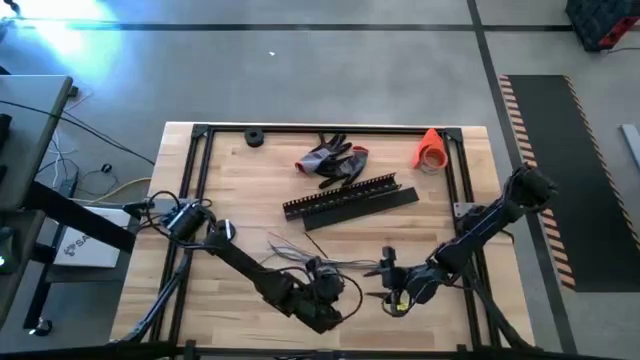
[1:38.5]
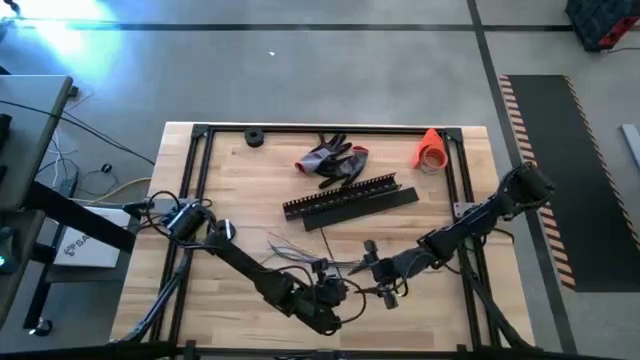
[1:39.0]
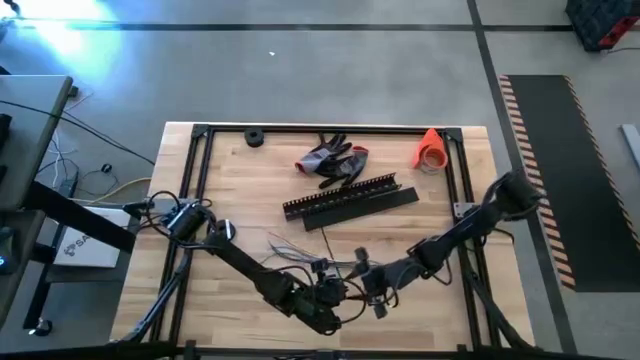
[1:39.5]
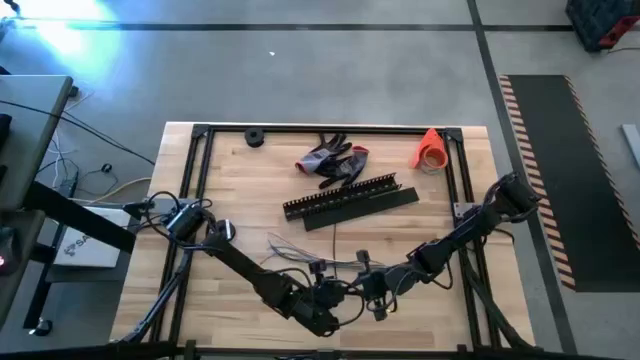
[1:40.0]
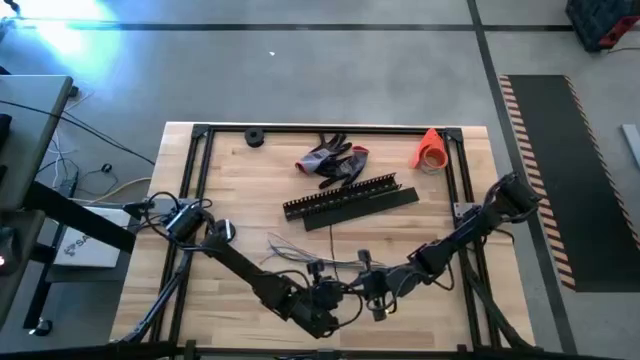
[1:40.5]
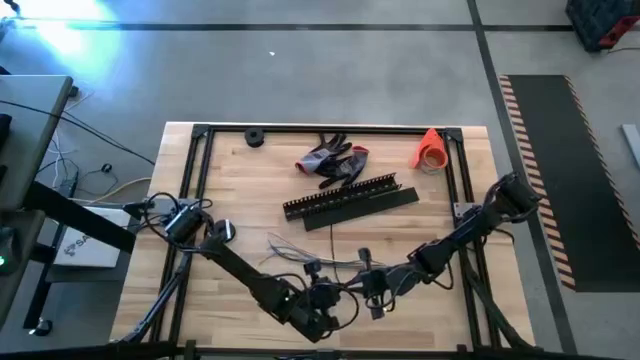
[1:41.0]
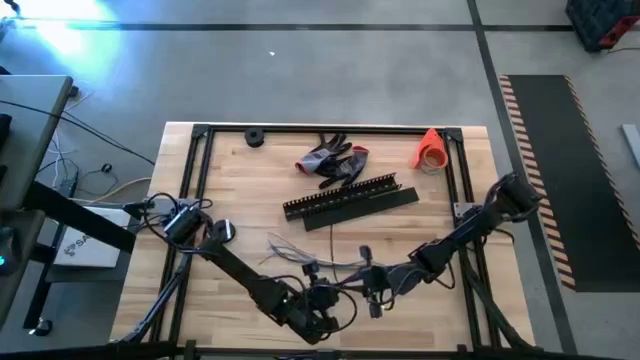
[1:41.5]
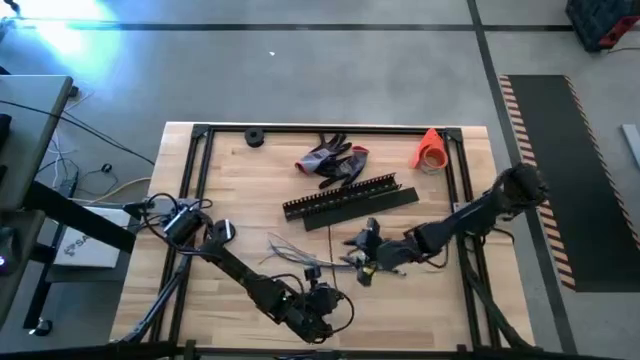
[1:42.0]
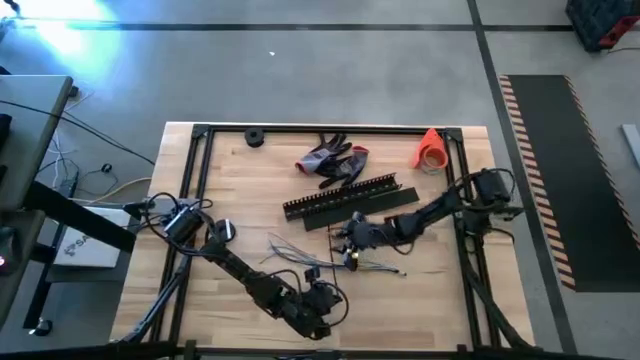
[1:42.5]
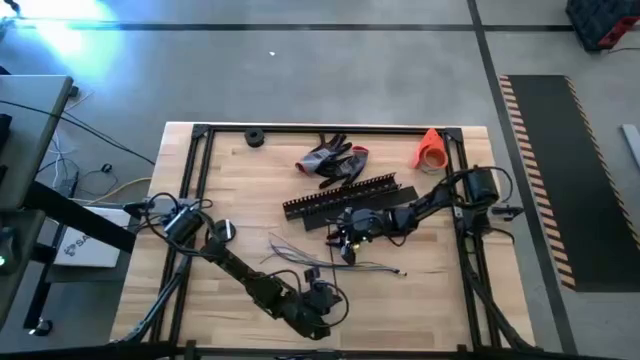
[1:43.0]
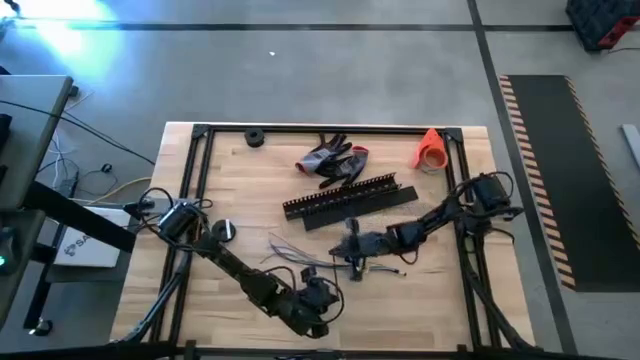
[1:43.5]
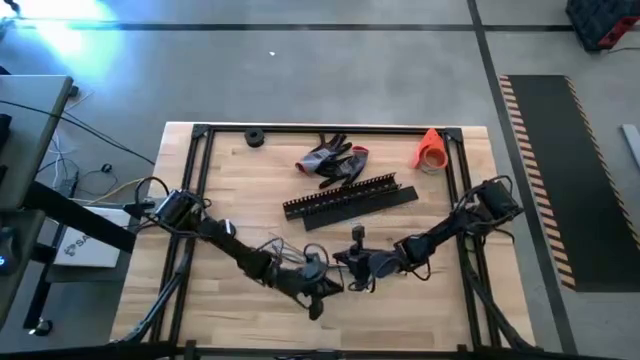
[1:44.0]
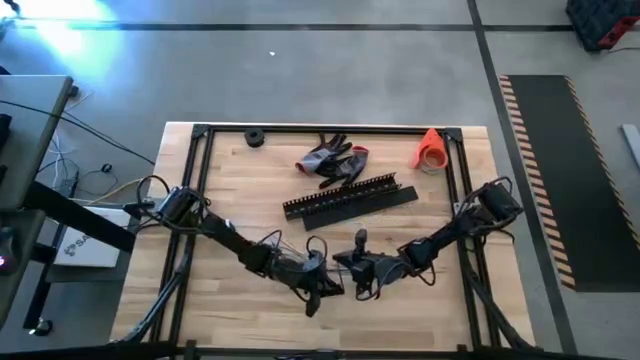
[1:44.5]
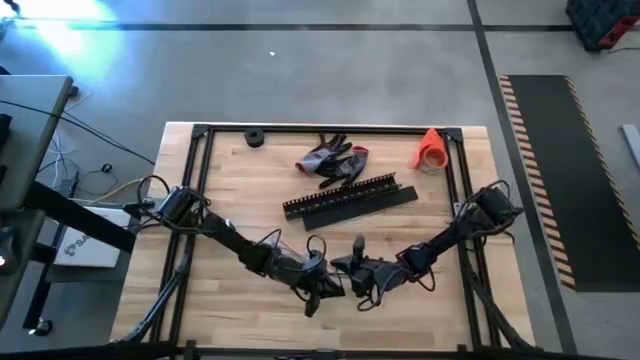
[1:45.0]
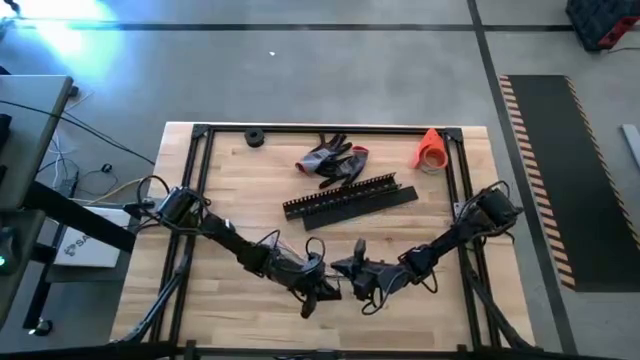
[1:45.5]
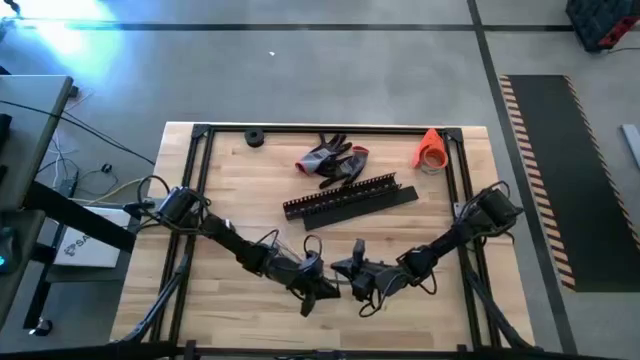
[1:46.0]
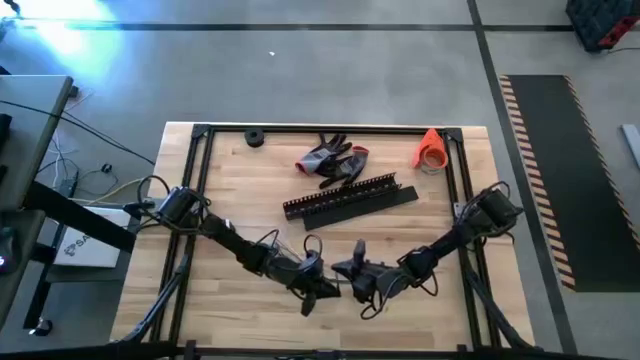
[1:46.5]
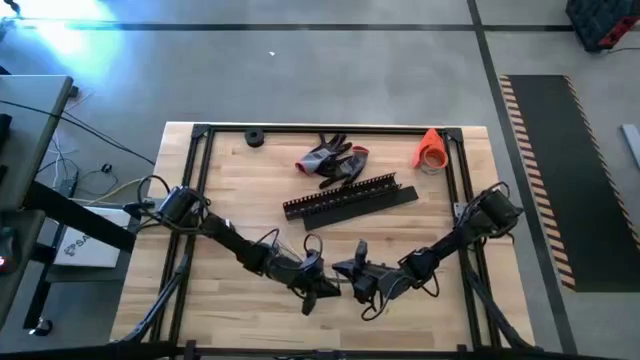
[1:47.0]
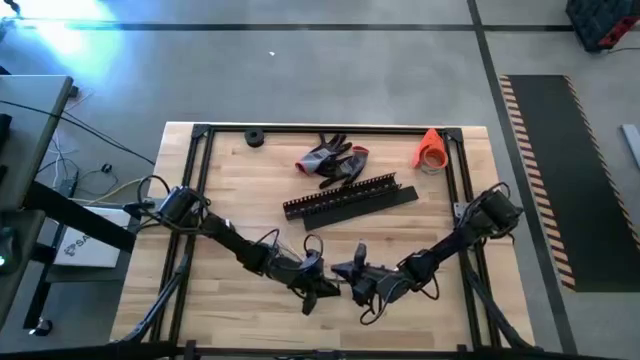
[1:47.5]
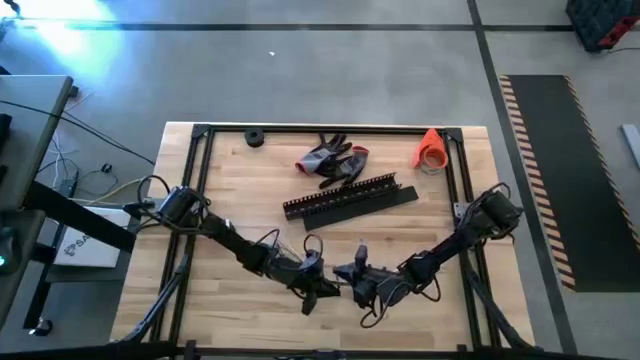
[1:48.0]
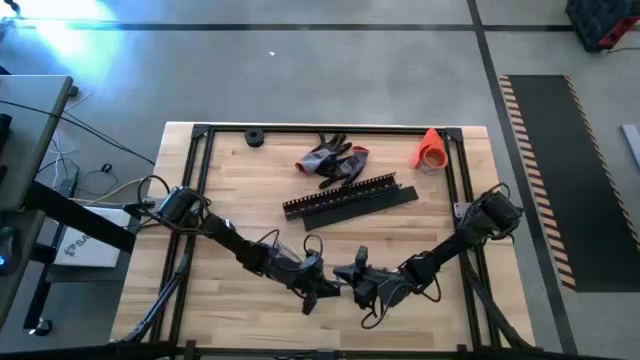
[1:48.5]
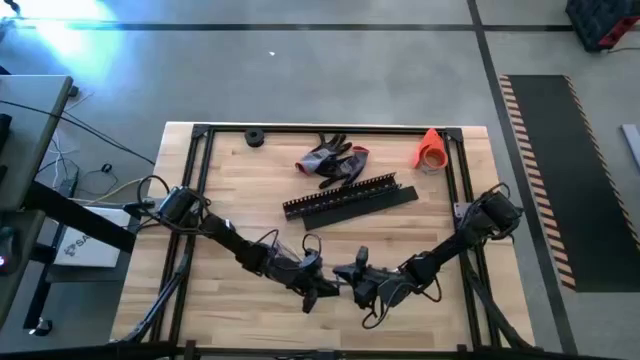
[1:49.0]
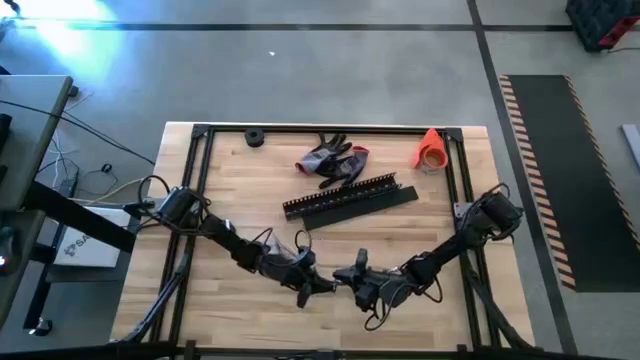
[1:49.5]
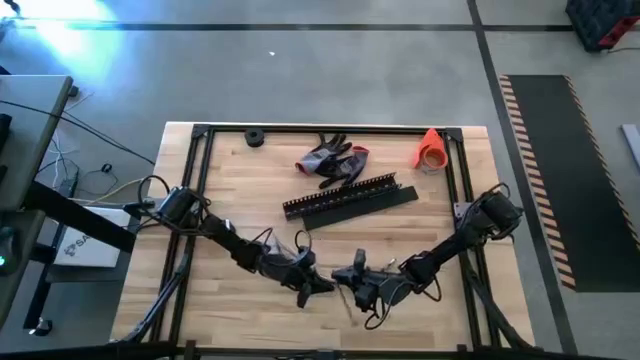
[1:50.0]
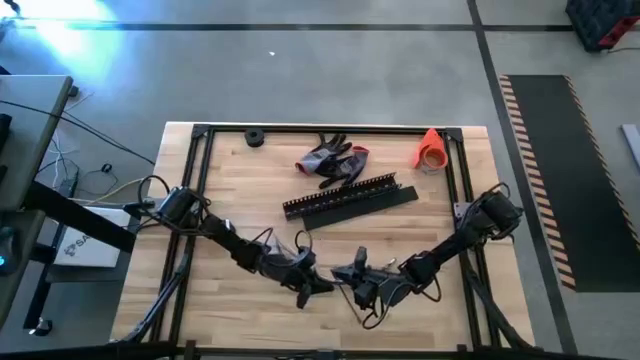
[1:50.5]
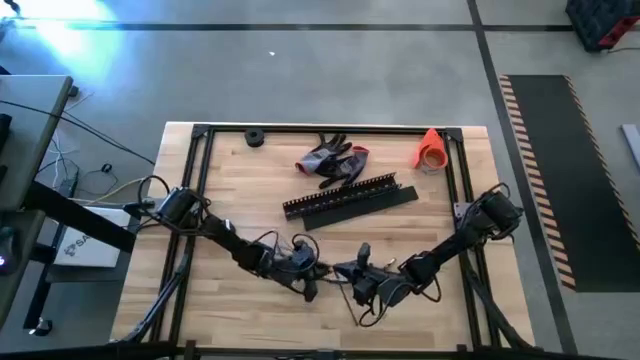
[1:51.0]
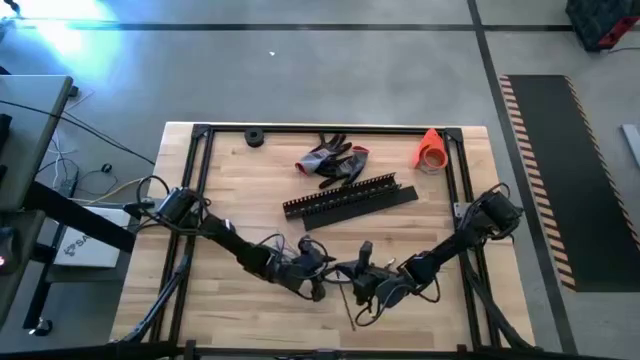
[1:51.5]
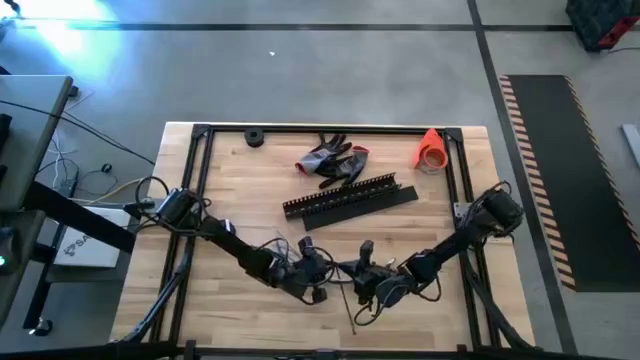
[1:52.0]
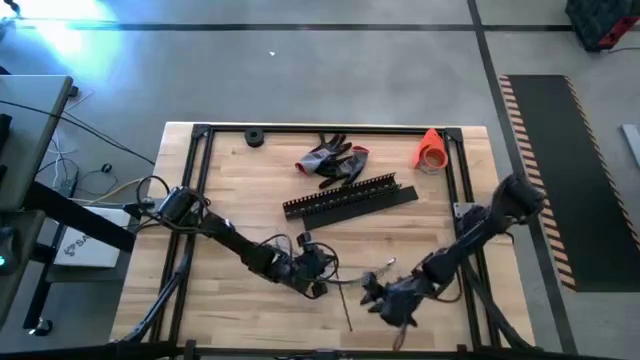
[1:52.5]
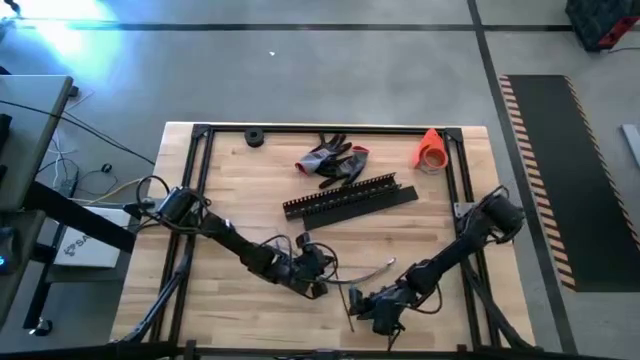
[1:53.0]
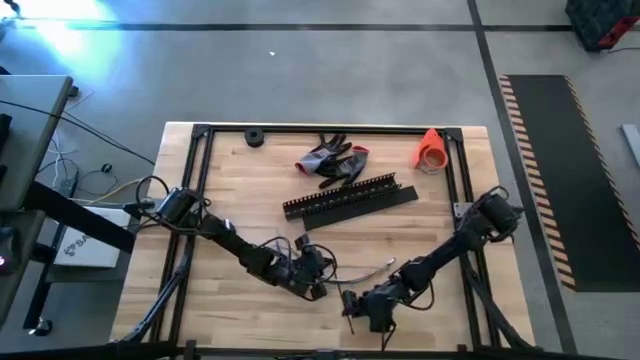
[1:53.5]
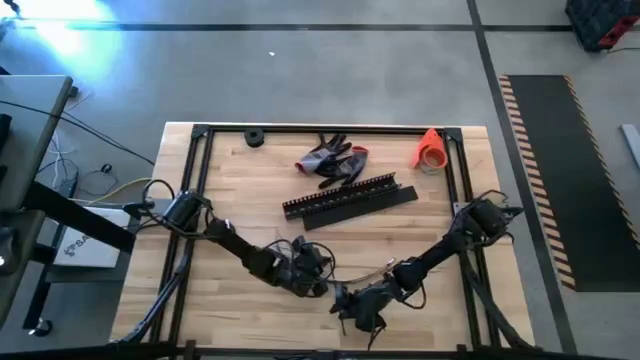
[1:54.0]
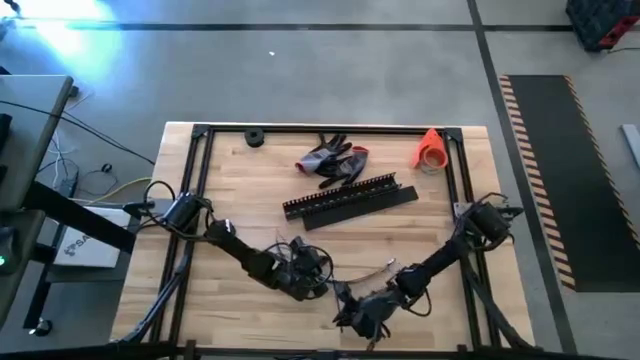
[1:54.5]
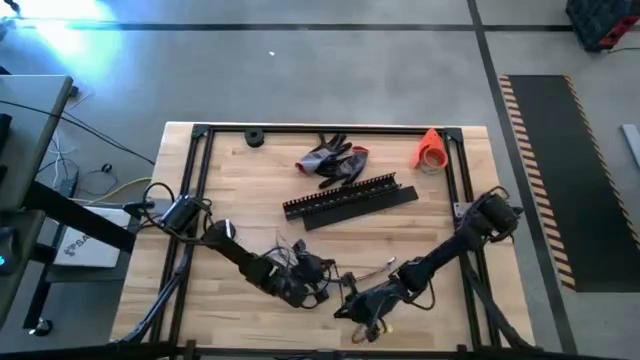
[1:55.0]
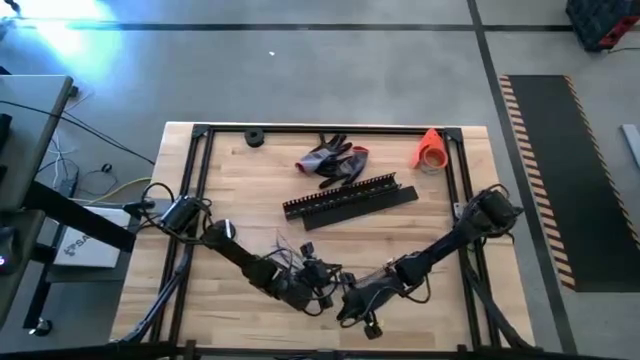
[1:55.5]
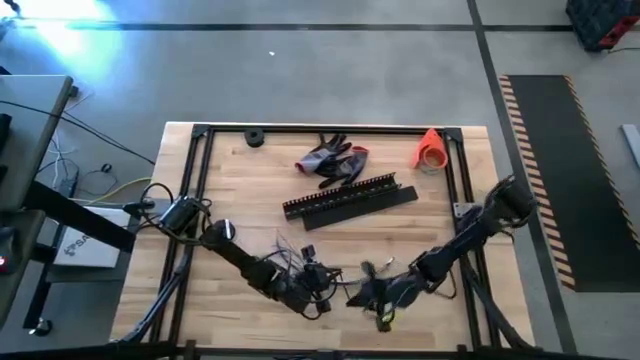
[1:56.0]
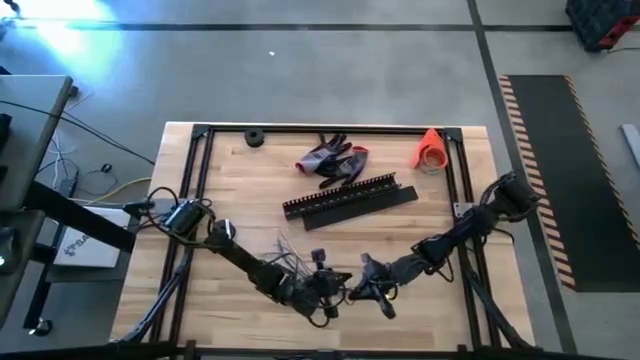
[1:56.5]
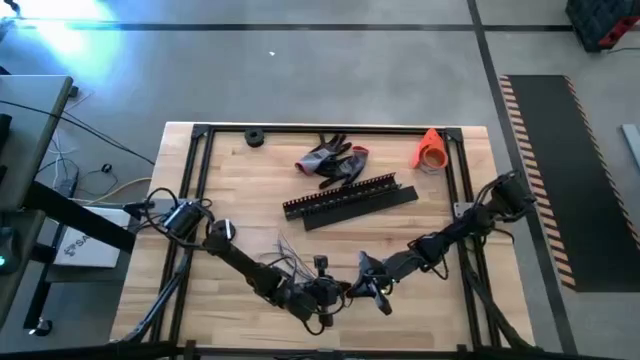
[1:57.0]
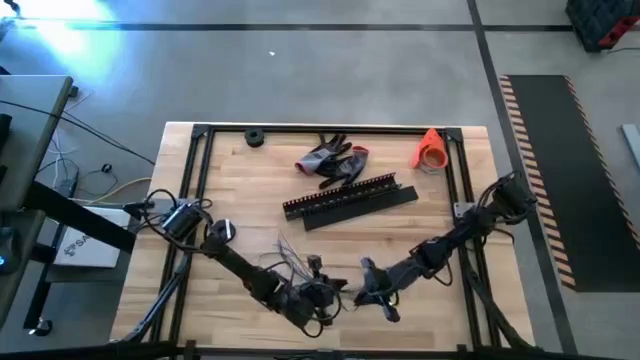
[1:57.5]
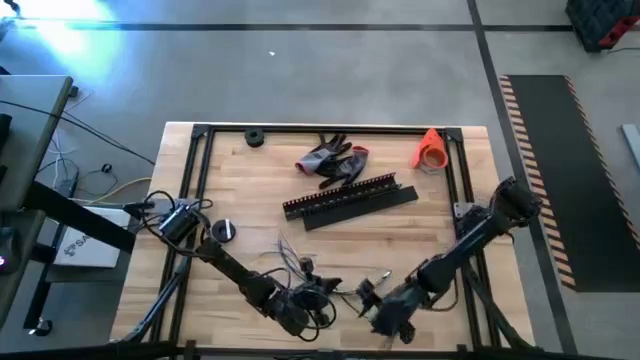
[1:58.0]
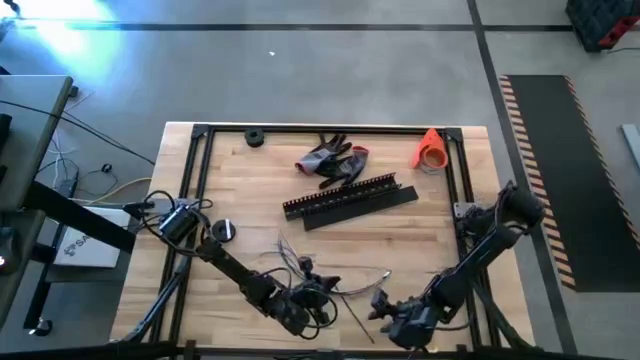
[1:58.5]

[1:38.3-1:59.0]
Task: Ziptie cables
Wrap the cables using a black zip tie
